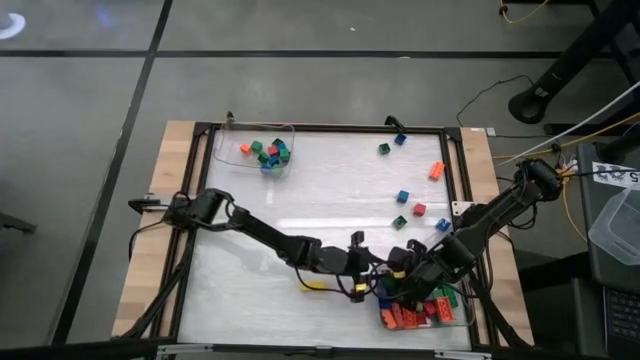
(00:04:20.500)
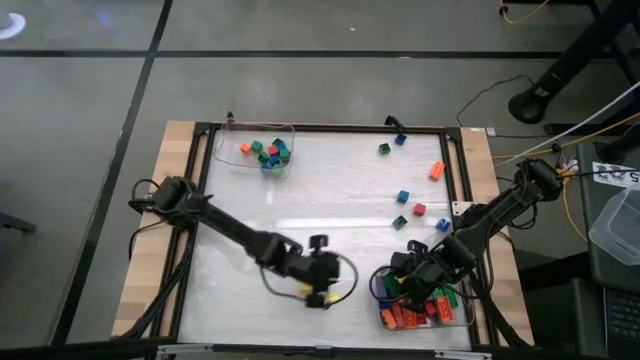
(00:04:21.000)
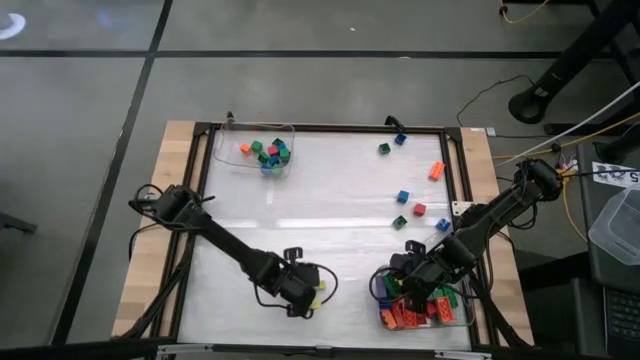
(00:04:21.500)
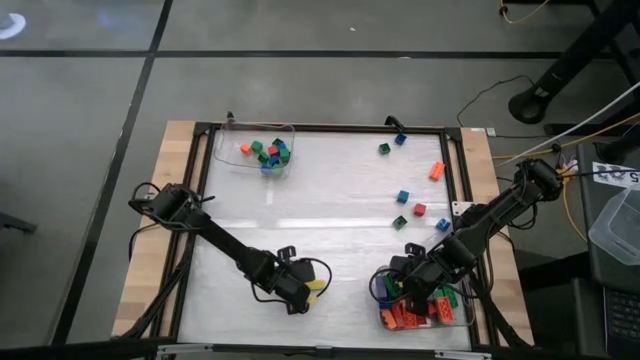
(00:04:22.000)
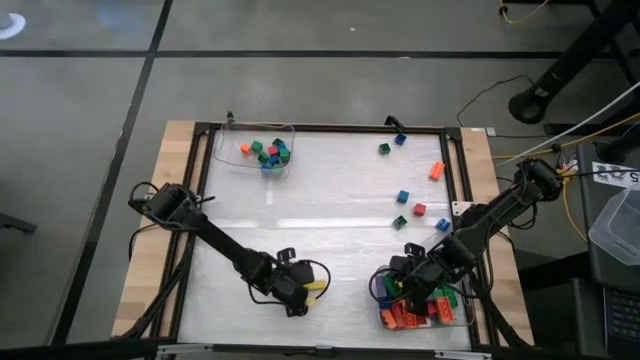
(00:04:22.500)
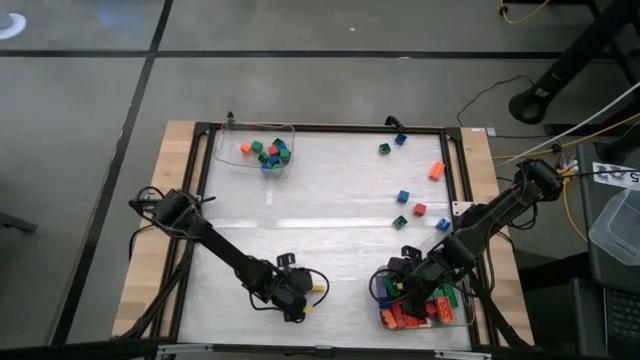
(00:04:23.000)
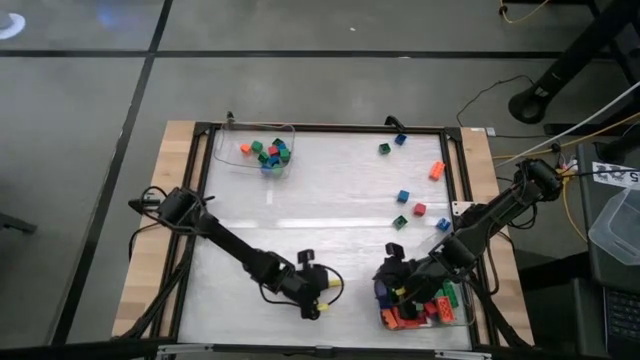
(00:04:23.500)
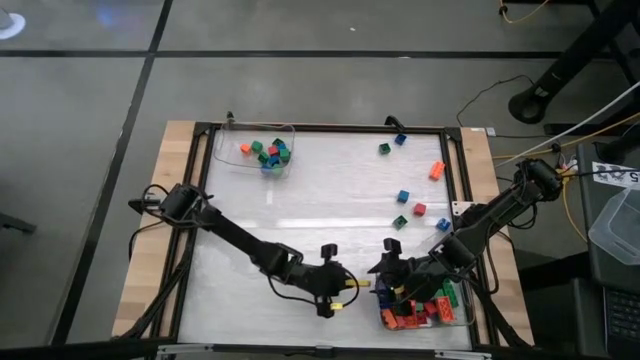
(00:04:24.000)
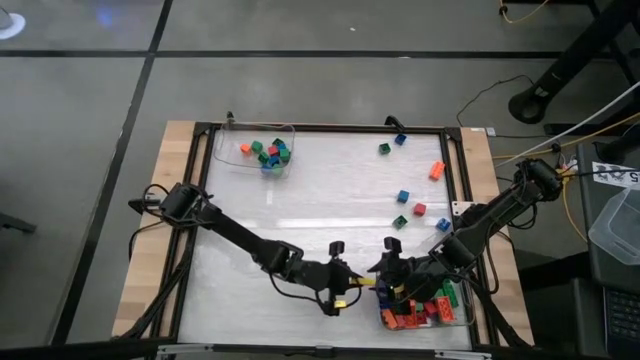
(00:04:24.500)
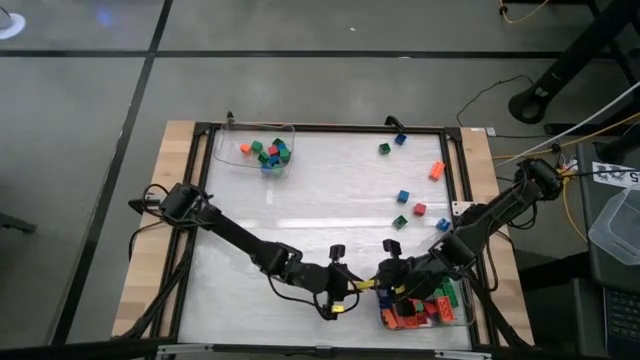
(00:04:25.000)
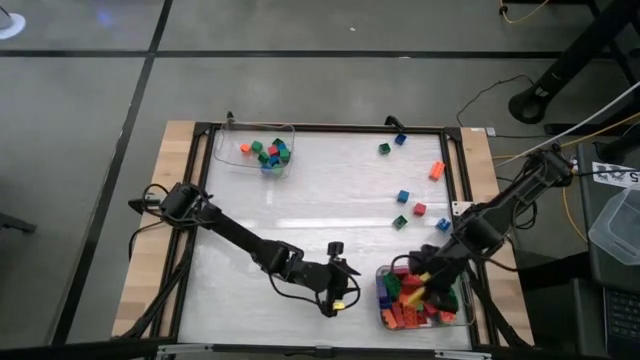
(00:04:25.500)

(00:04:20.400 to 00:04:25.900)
Task: Sort blocks by size
Put the rectangular yellow block into the bottom transparent bin

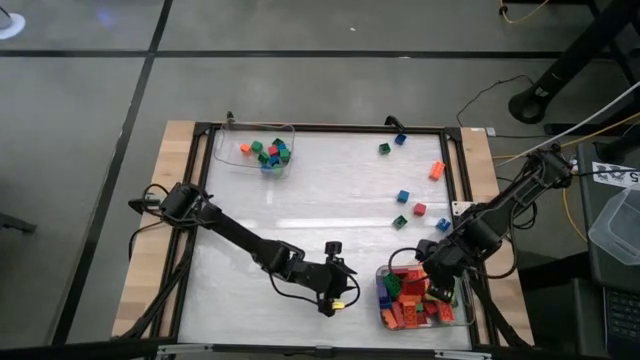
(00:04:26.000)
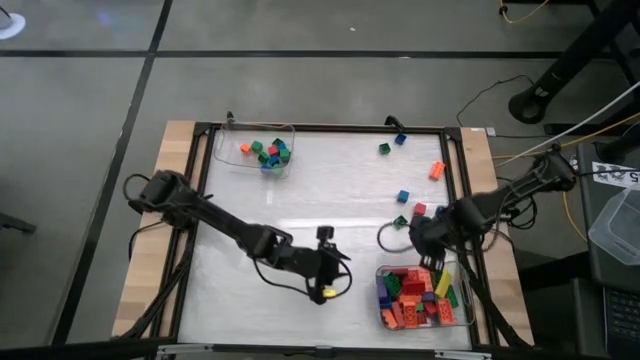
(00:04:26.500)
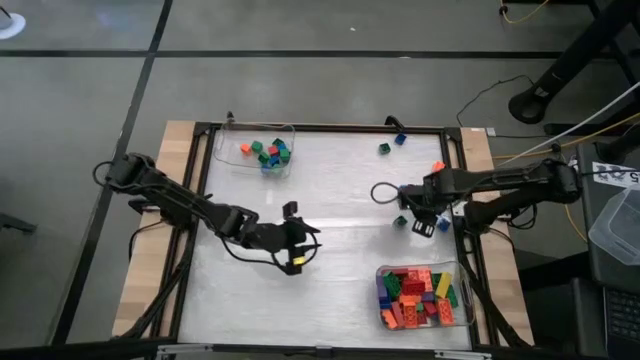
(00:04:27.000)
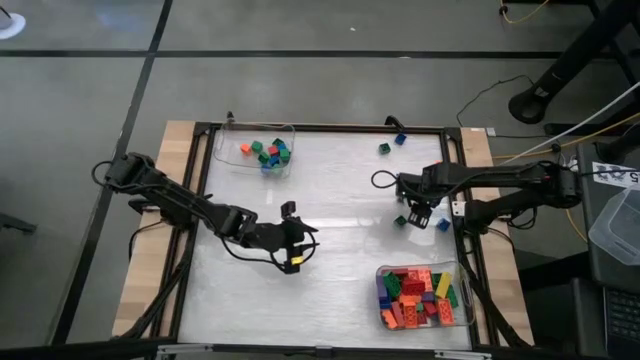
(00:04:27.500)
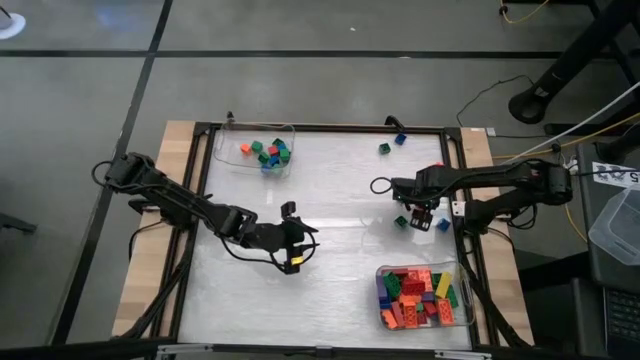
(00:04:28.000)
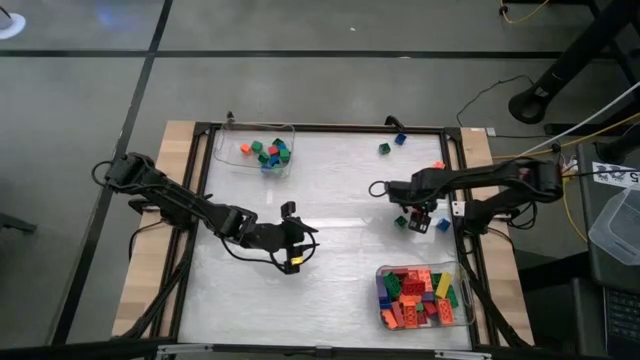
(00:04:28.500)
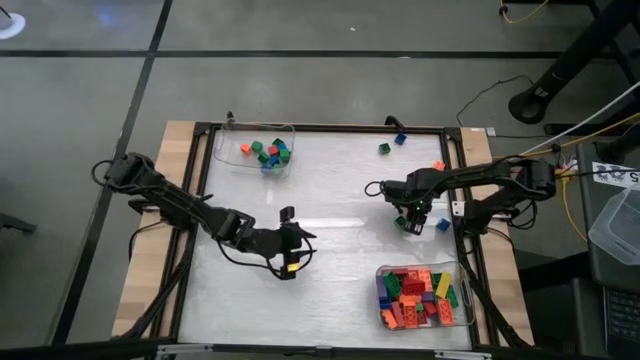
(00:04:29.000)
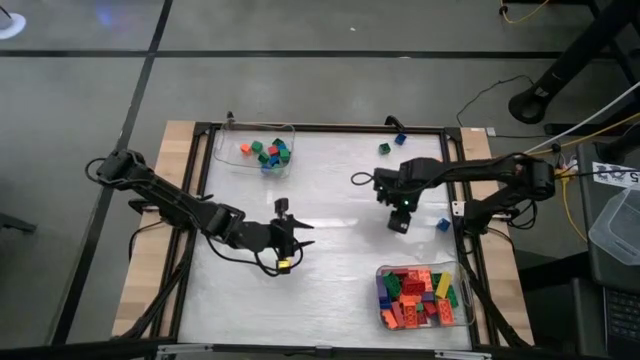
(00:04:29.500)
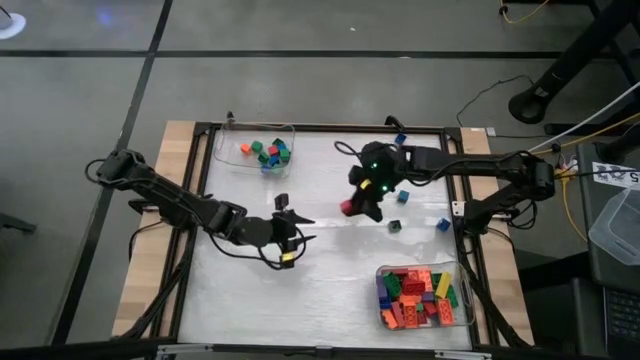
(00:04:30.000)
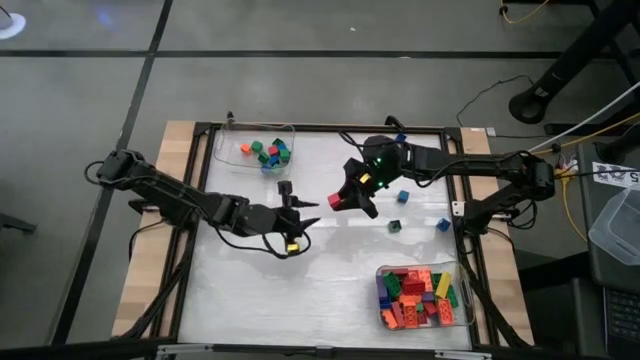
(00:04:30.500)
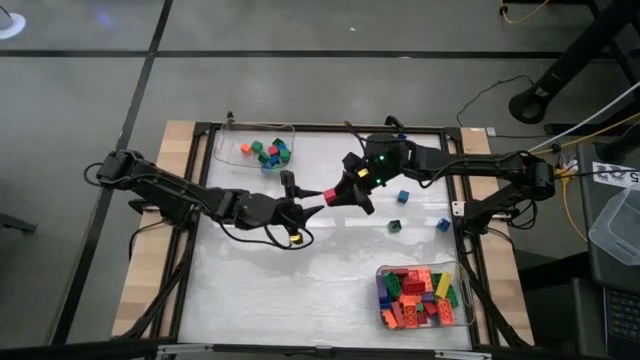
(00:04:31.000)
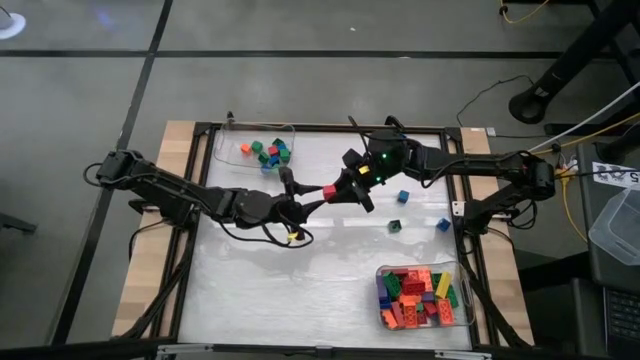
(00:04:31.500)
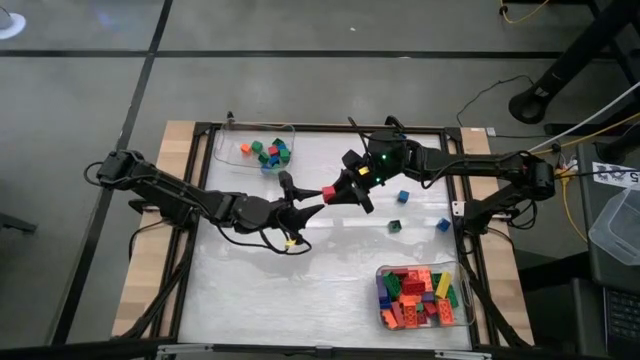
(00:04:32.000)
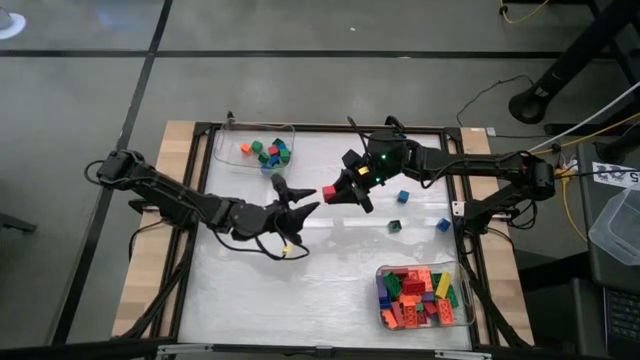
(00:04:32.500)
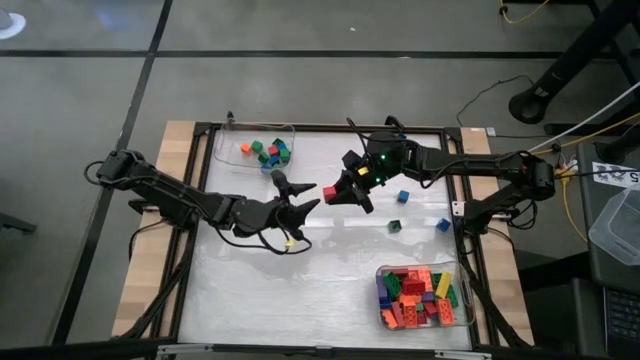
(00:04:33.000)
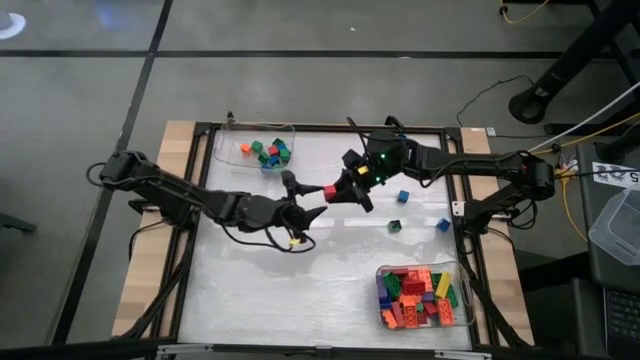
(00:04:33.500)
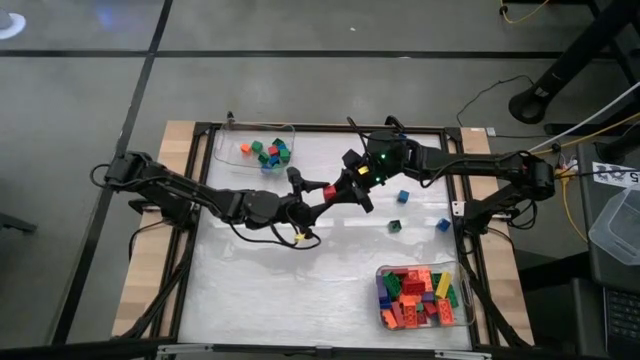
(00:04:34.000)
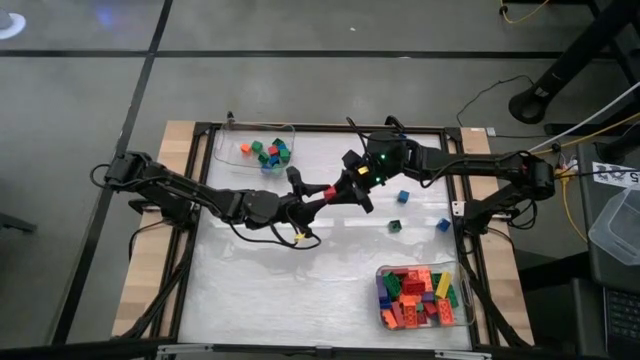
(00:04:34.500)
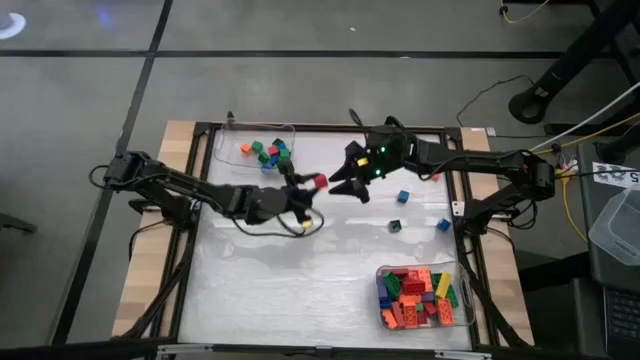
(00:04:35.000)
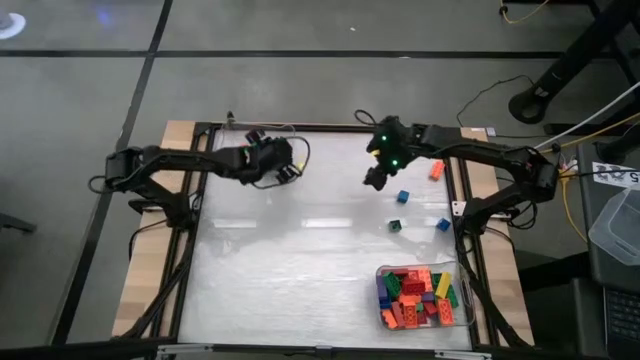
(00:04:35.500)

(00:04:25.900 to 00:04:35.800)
Put the square red block into the top transparent bin

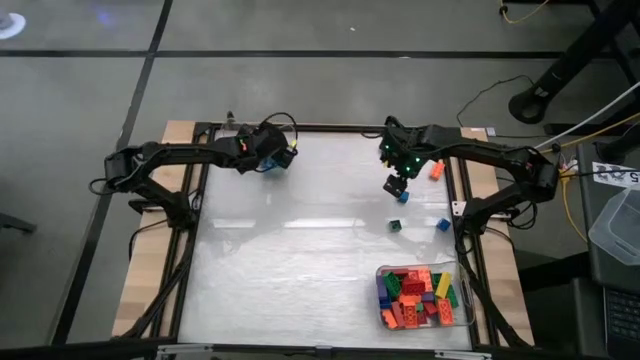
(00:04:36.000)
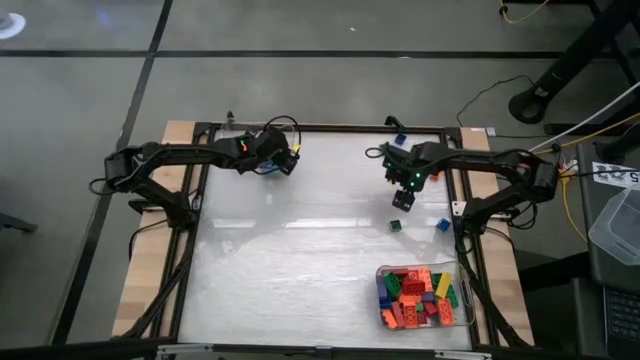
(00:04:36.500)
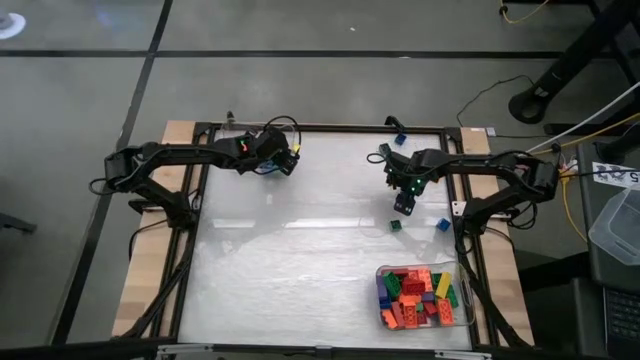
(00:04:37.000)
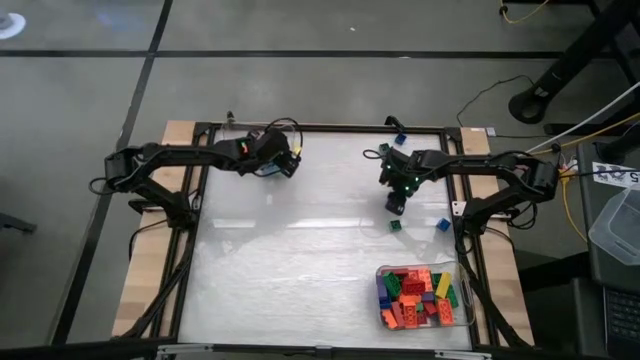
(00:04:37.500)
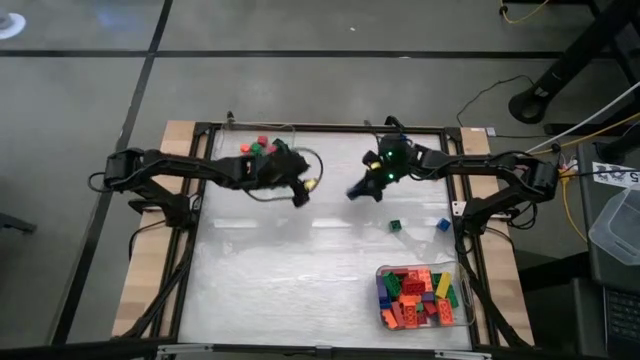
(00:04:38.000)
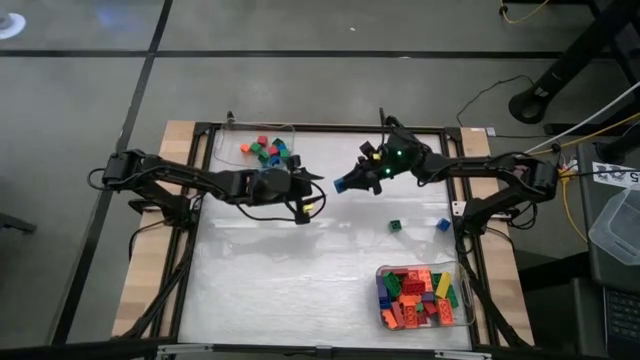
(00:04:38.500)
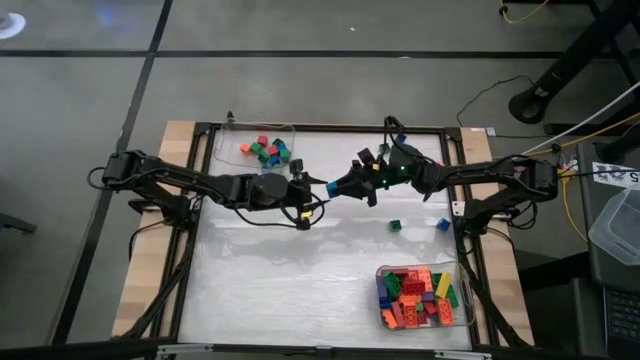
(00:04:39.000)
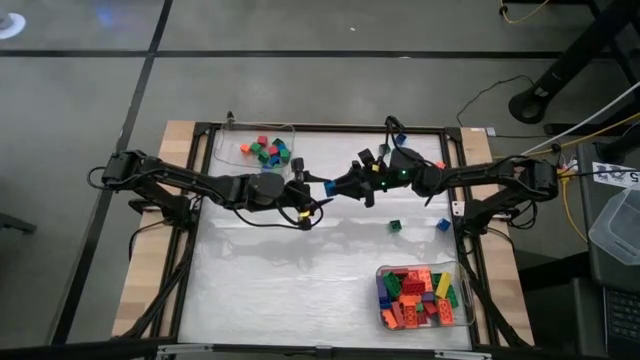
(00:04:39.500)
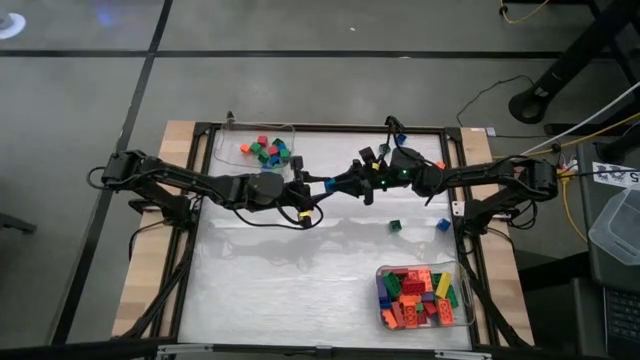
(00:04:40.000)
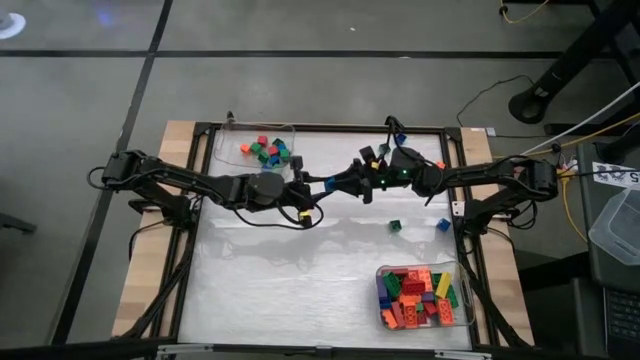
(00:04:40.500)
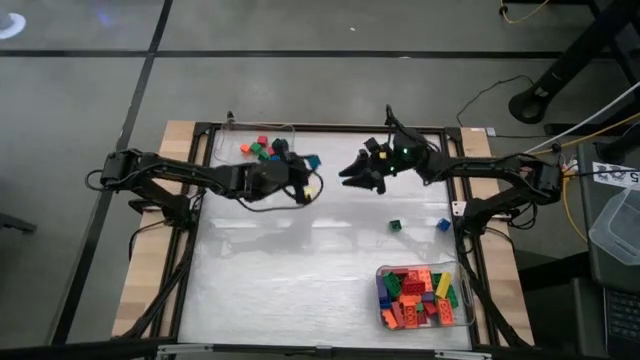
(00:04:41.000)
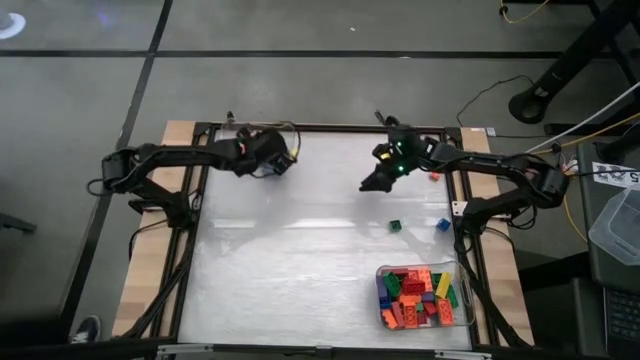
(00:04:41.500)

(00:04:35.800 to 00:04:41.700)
Put the square blue block into the top transparent bin
